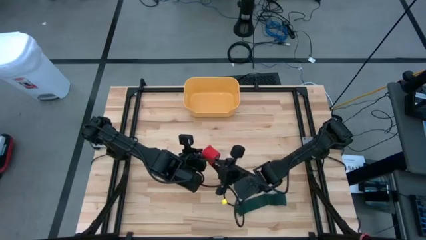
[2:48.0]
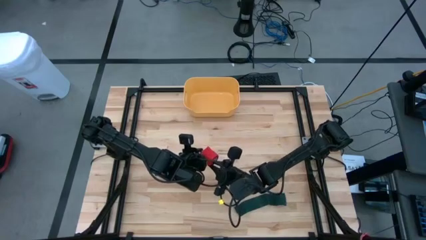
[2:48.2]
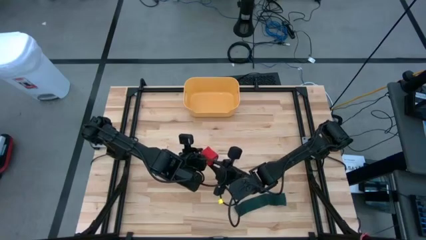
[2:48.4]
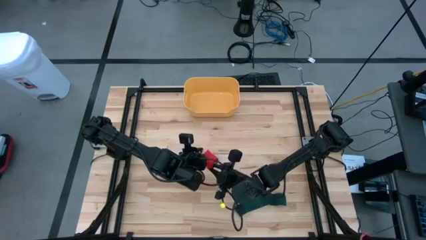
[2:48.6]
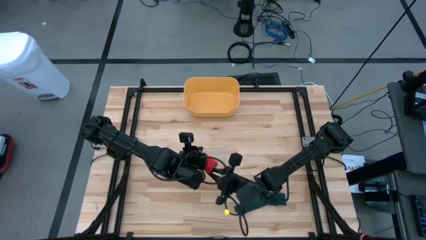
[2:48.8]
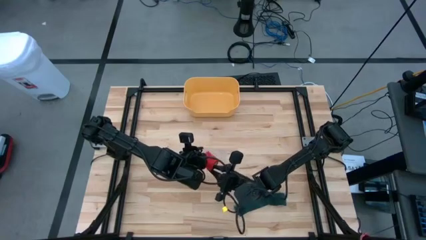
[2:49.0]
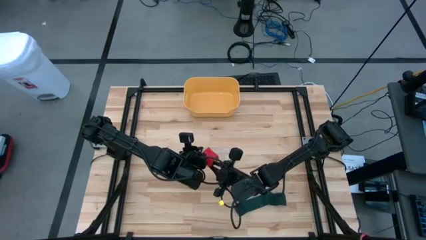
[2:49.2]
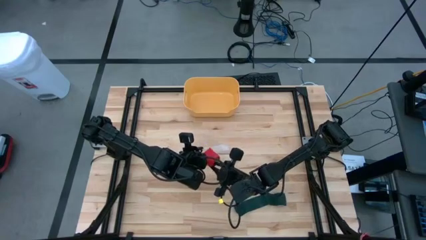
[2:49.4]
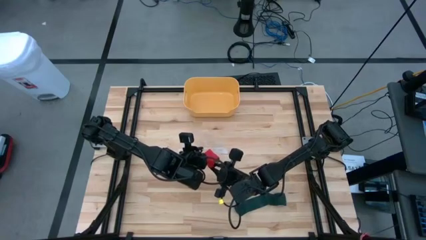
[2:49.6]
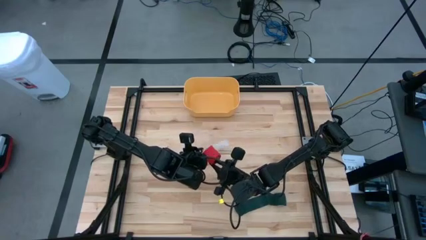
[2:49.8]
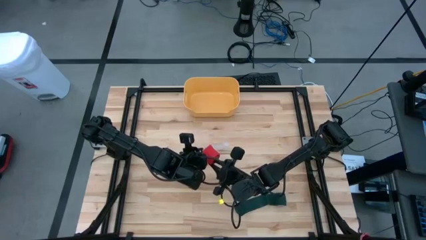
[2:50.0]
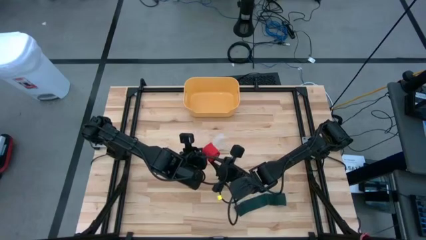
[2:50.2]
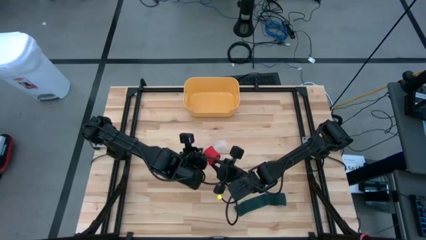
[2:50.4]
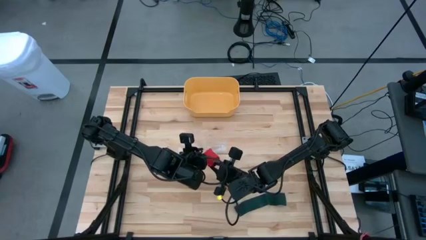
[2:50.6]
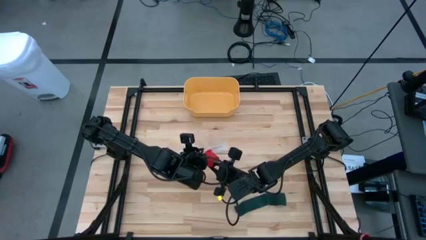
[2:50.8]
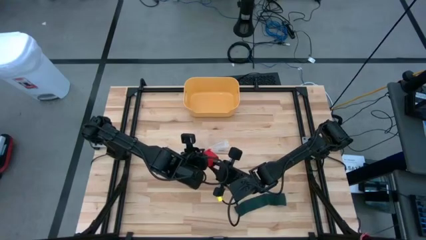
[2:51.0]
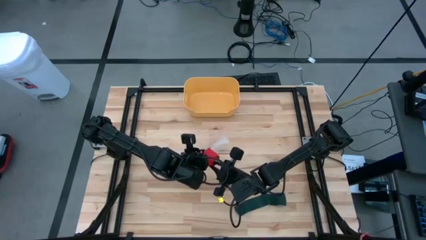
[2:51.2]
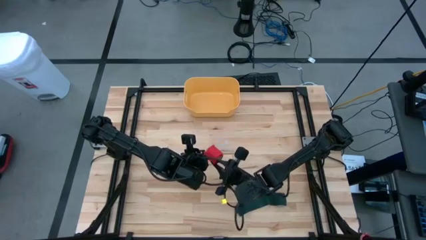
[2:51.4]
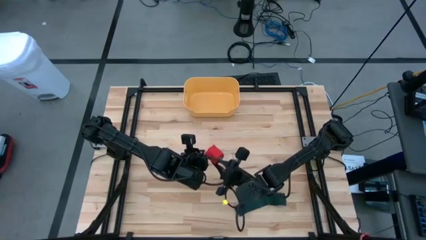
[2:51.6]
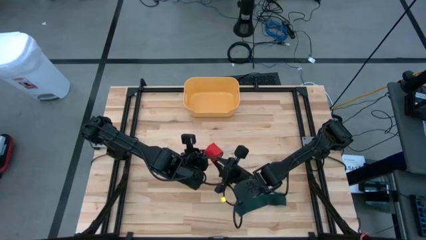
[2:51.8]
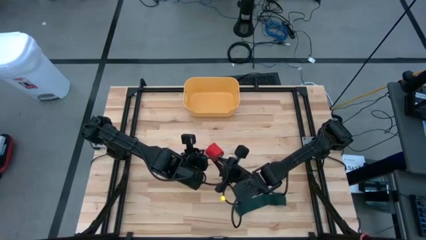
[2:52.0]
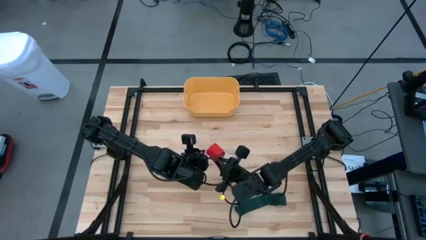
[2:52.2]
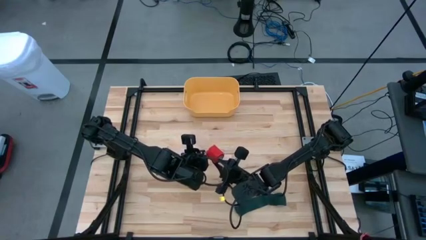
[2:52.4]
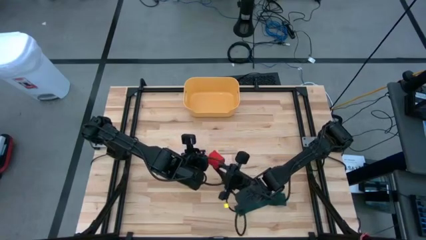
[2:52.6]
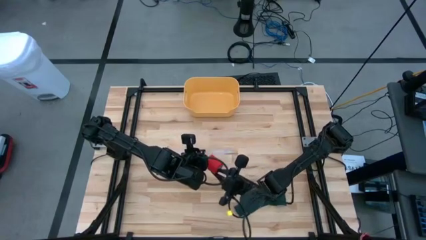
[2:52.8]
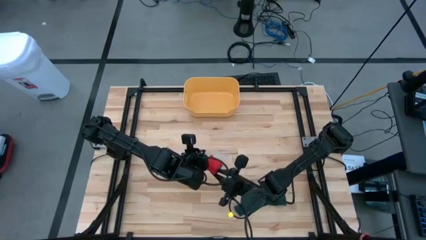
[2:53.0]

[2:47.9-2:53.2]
Task: Roll bandage
Put the rolled red bandage into the transparent zip bag

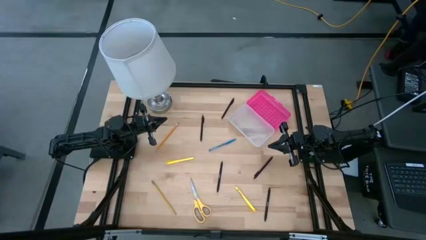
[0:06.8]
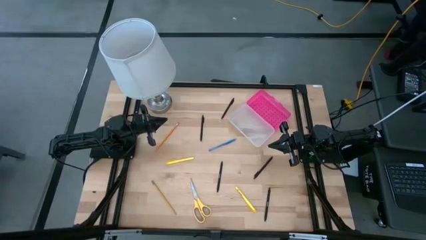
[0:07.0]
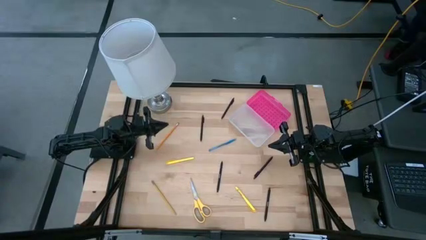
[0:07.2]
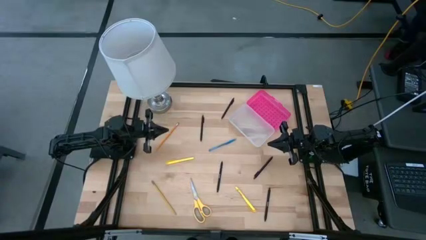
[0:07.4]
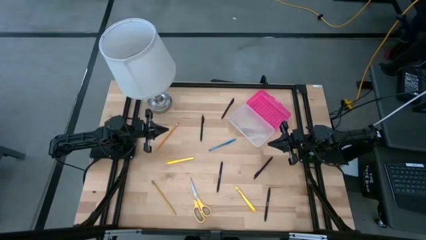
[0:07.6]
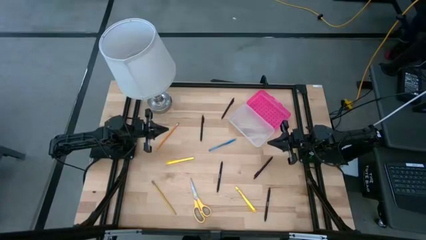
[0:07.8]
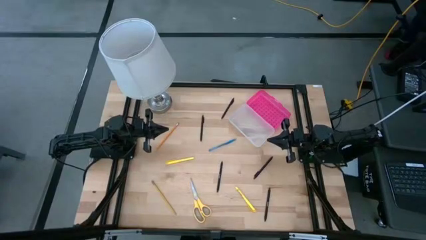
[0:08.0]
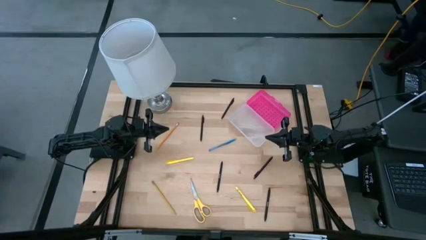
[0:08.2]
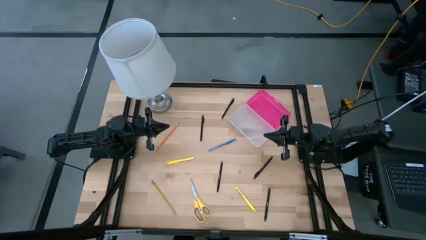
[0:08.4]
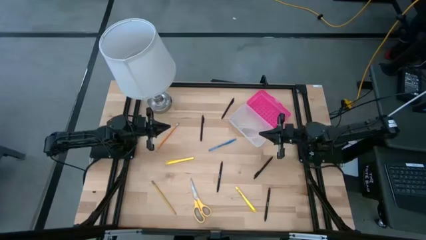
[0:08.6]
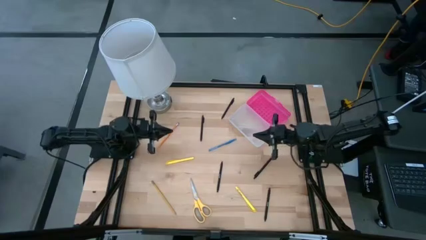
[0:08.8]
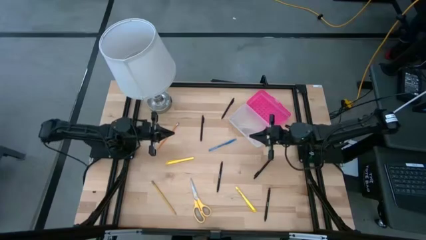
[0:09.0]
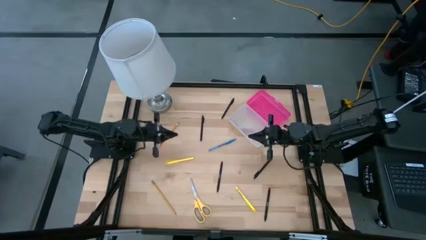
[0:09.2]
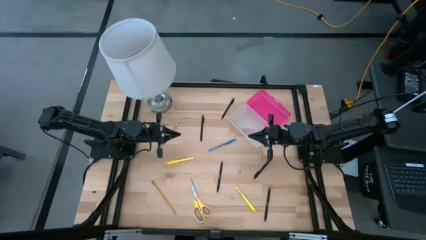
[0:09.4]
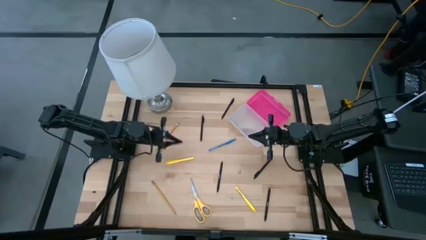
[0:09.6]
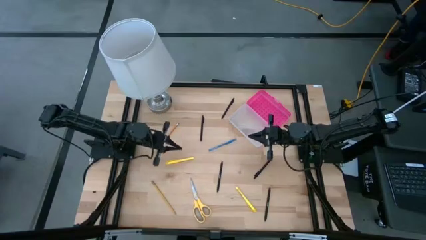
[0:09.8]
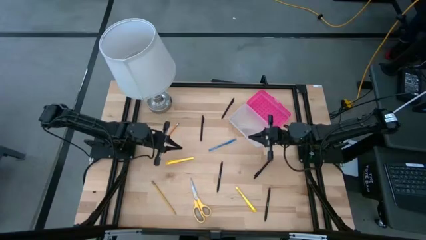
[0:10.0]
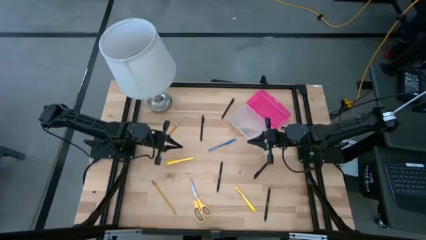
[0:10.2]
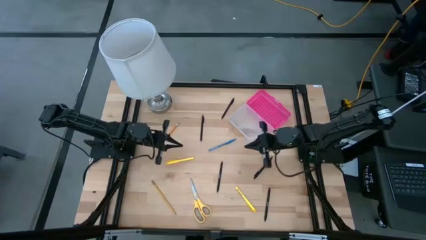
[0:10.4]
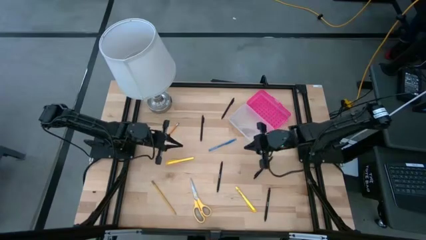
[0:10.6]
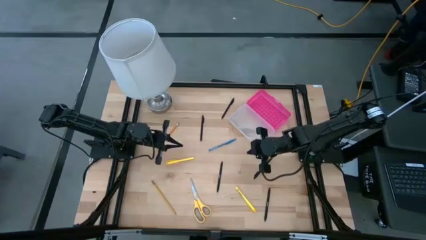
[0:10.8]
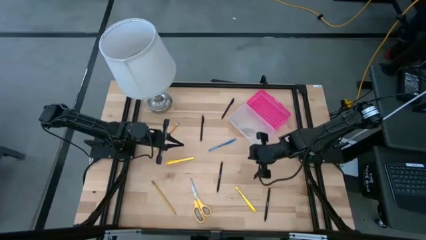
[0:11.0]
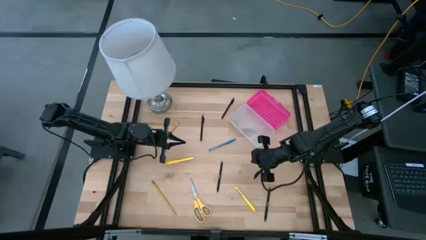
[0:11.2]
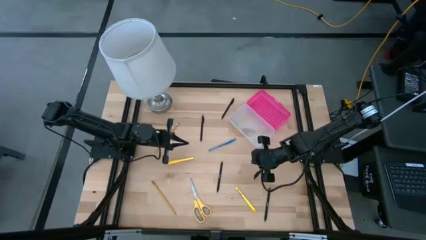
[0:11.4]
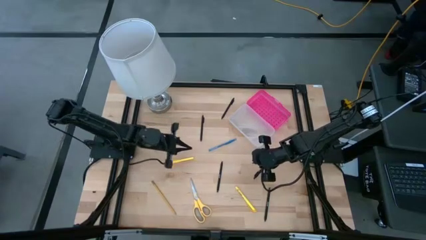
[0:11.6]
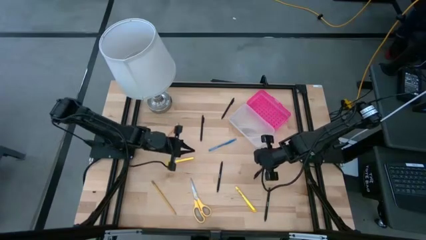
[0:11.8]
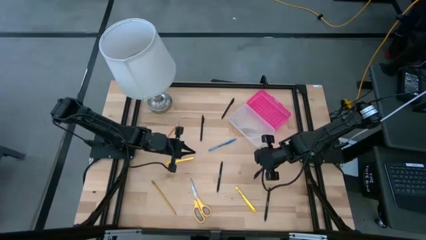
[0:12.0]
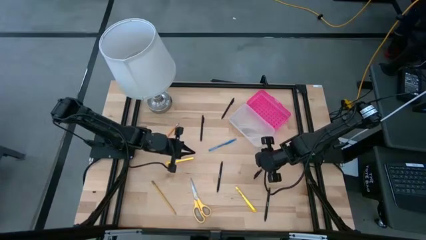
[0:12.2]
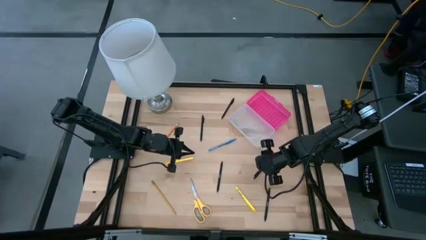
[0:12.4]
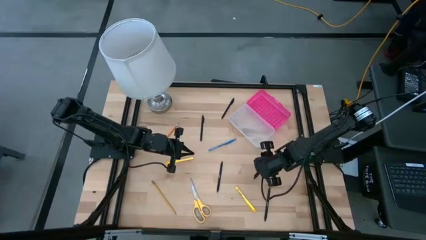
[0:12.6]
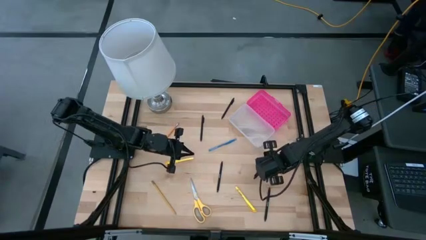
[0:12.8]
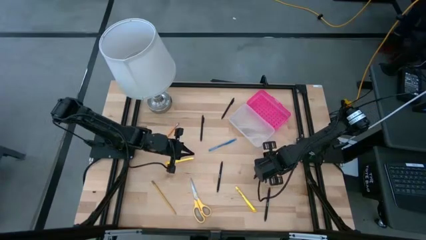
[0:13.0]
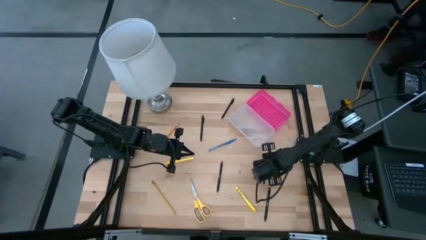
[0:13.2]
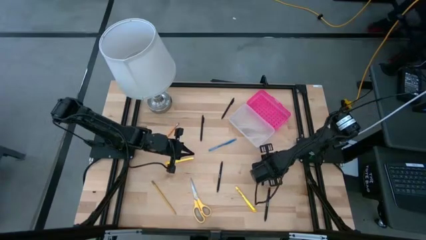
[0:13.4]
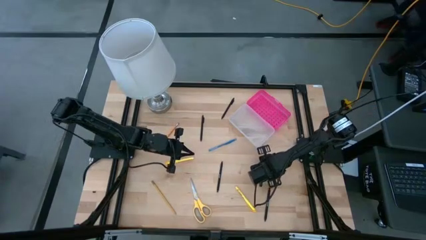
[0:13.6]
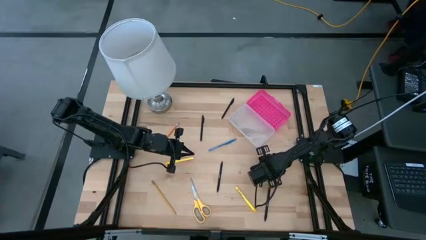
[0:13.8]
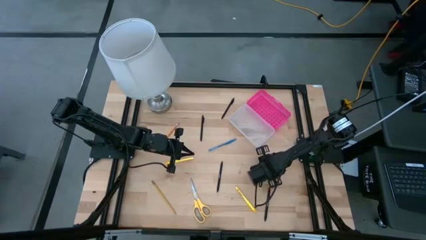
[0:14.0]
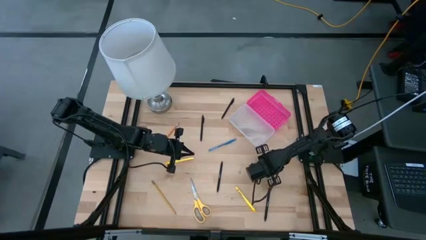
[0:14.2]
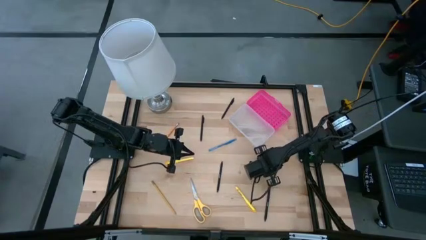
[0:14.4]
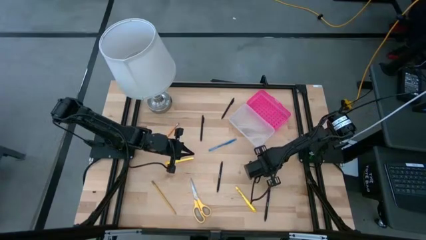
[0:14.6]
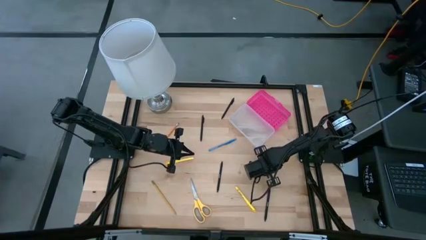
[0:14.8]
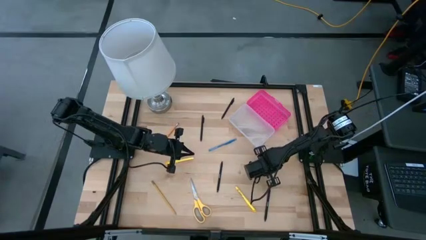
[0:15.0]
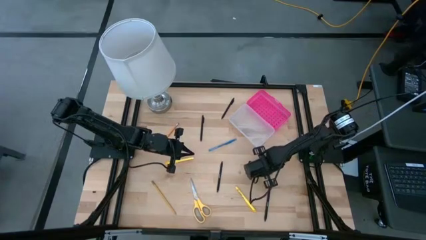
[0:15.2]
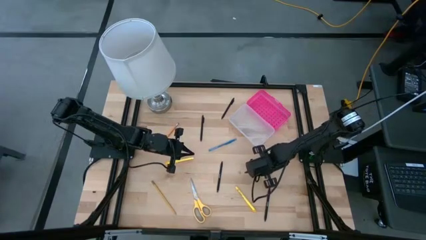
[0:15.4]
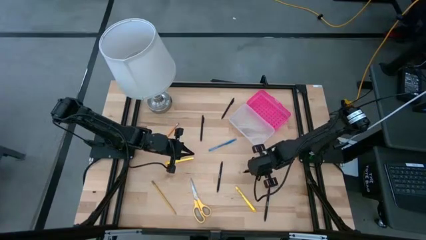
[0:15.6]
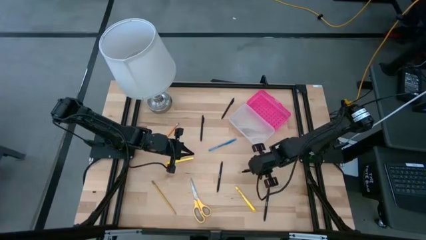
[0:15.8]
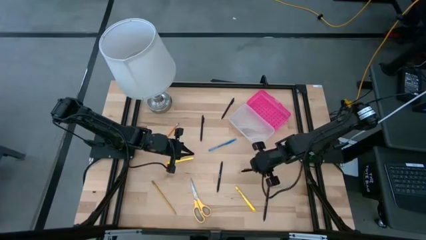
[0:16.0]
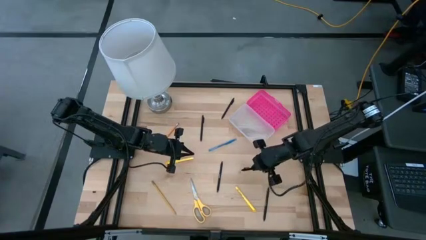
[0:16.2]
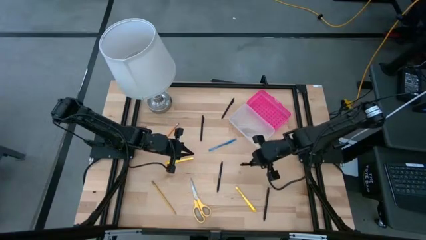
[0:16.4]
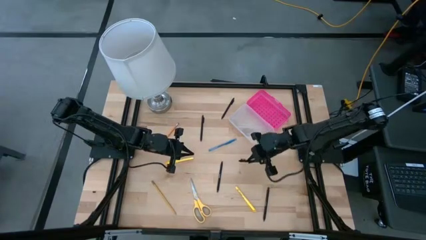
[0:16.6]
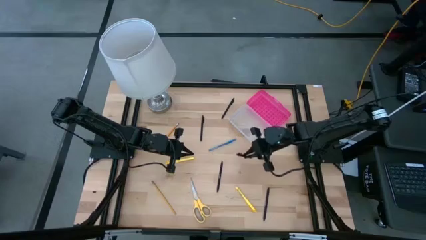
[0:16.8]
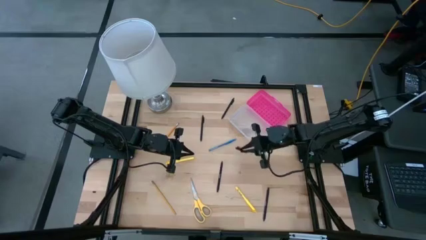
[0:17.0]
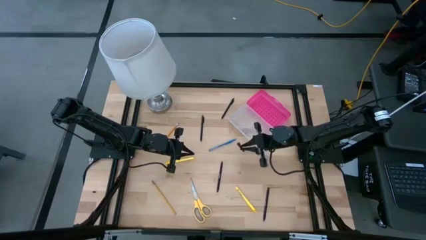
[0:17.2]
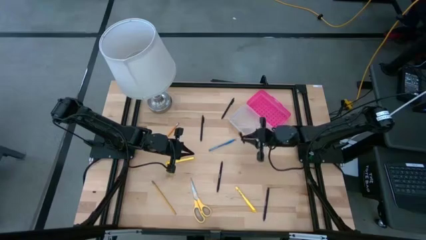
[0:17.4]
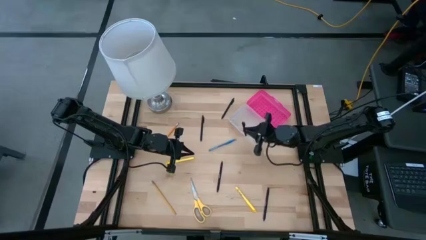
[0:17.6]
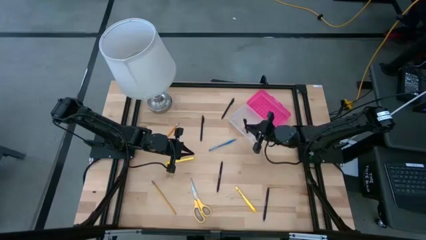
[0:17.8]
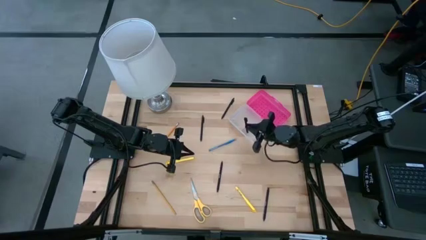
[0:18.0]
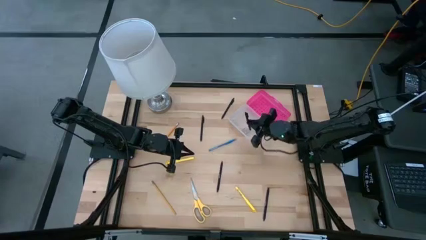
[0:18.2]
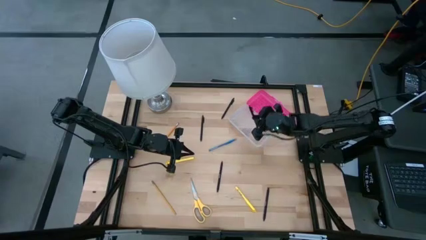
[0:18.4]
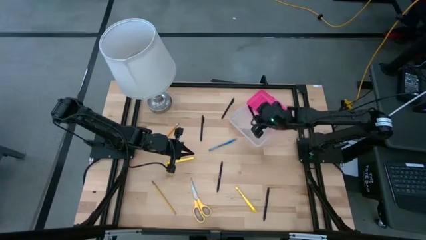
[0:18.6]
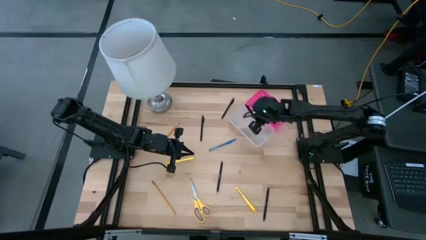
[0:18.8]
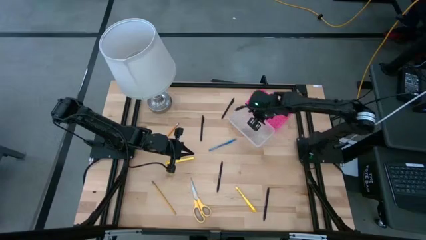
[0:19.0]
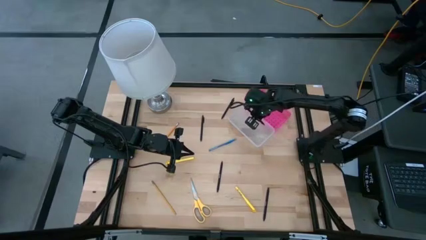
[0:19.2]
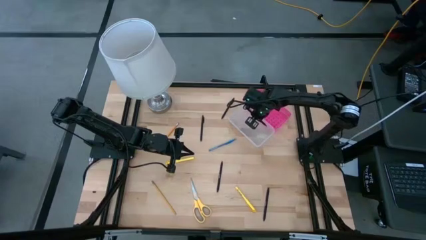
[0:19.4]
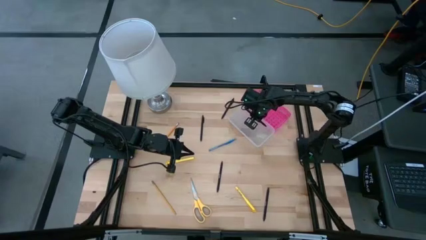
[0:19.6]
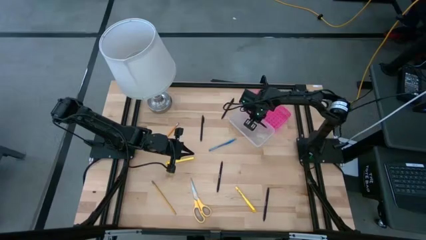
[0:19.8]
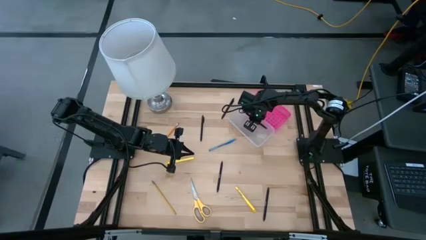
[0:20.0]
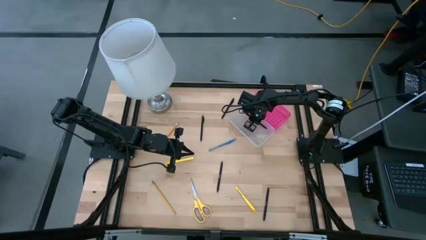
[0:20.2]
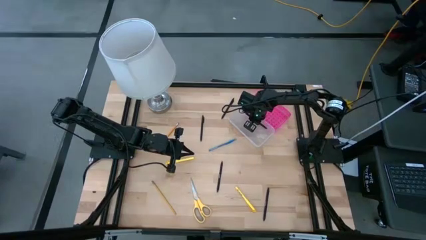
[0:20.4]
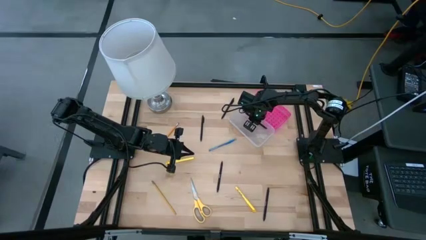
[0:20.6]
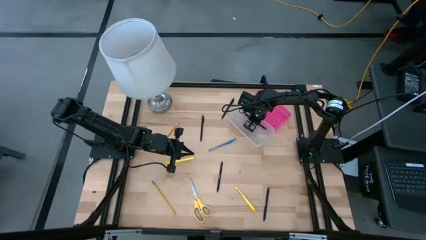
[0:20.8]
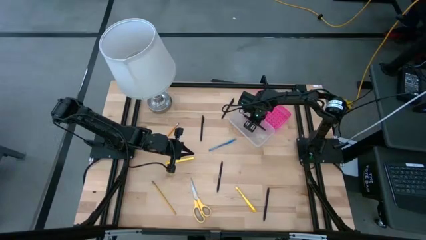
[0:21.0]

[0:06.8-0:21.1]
Task: Pick & place school supplies into a supply box
Put the black pen into the pink supply box
